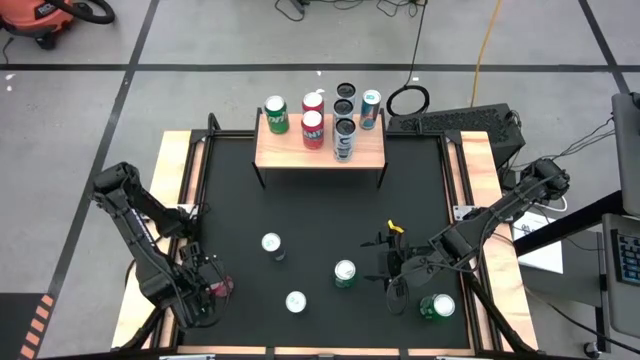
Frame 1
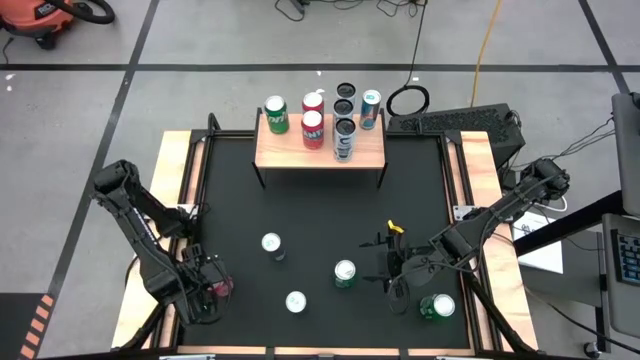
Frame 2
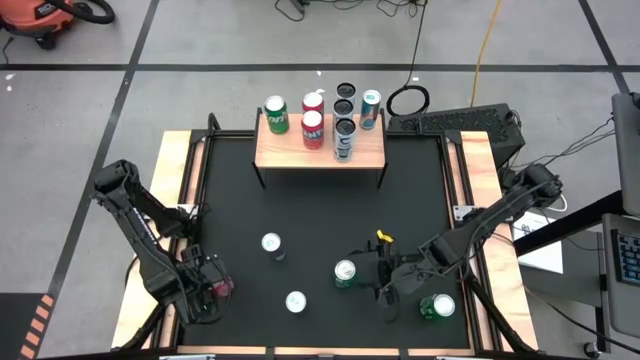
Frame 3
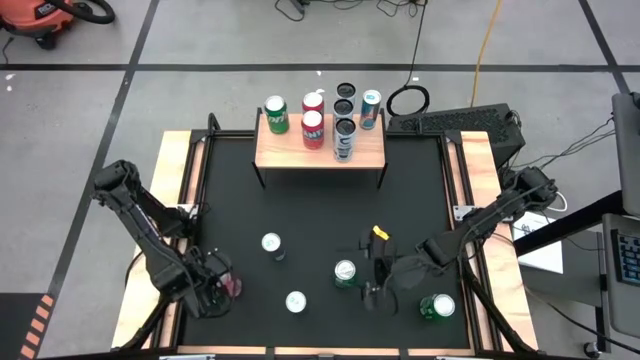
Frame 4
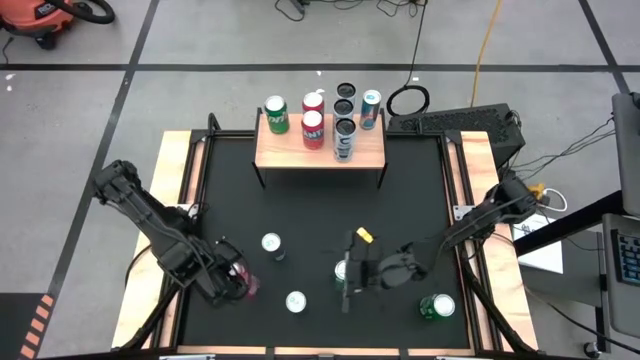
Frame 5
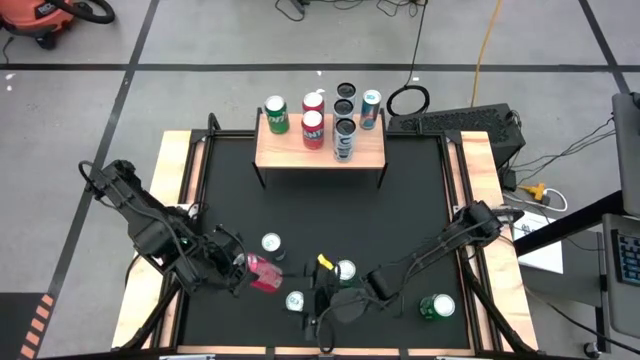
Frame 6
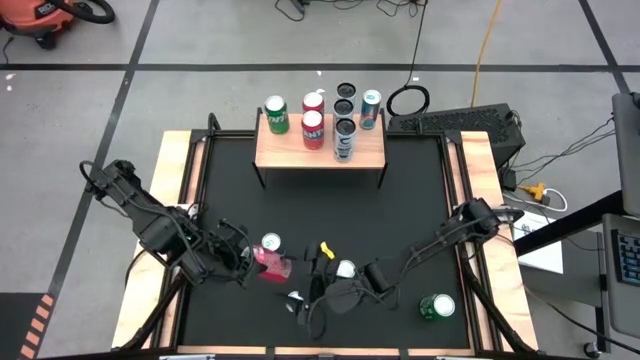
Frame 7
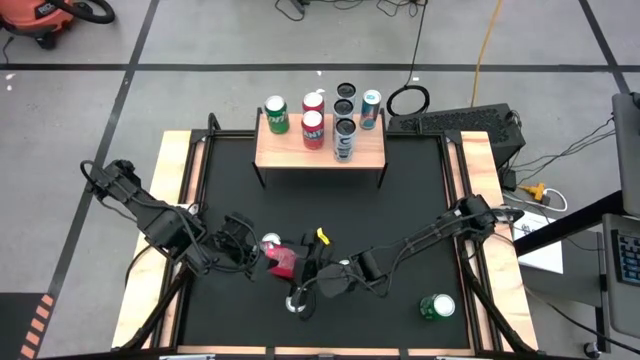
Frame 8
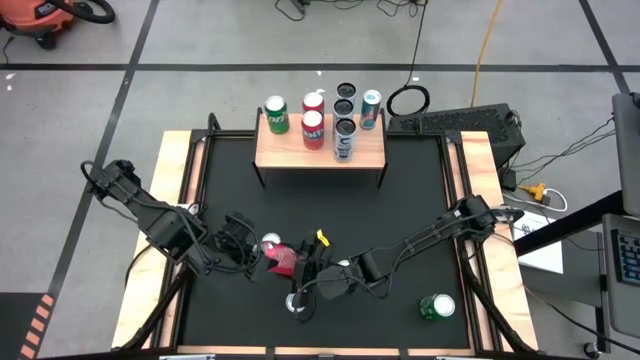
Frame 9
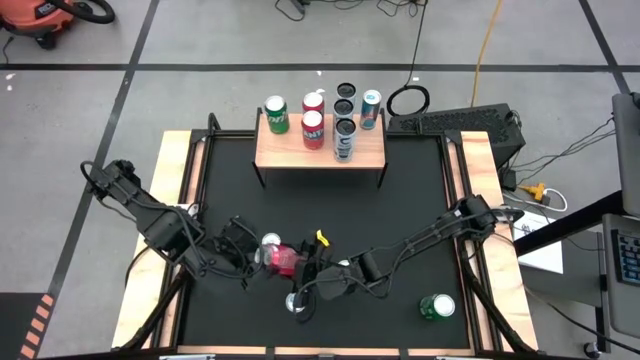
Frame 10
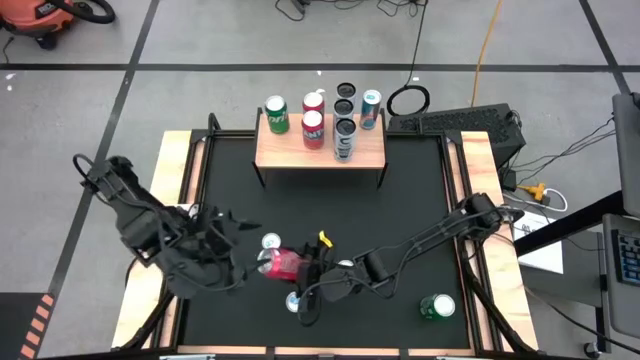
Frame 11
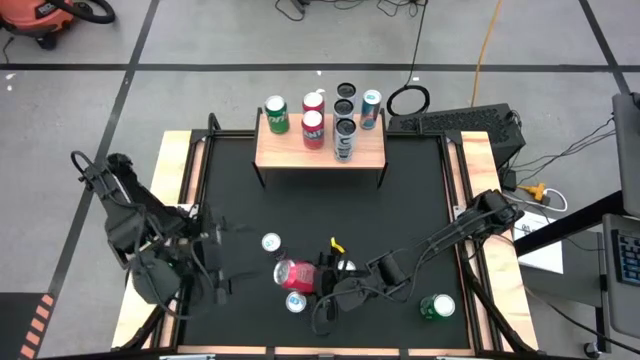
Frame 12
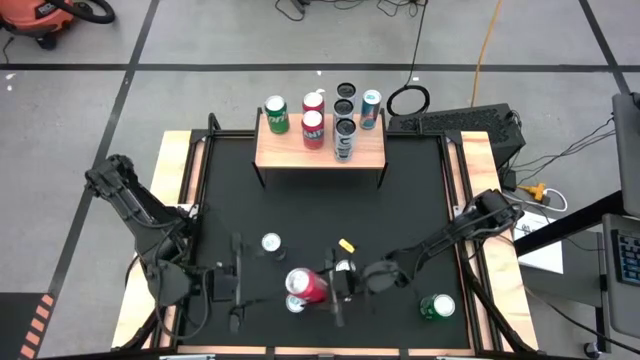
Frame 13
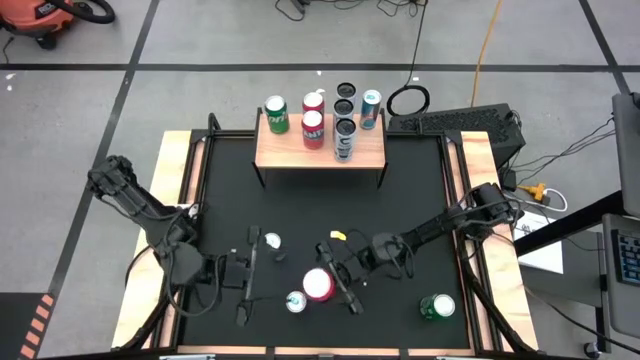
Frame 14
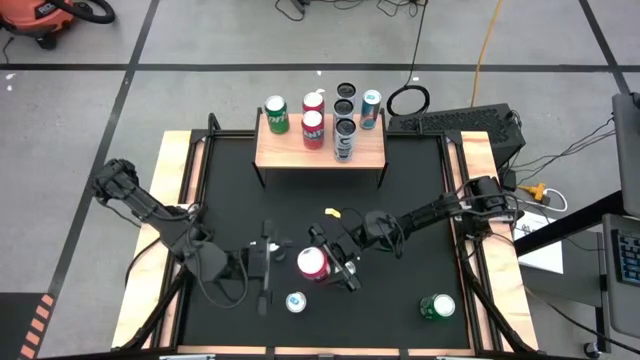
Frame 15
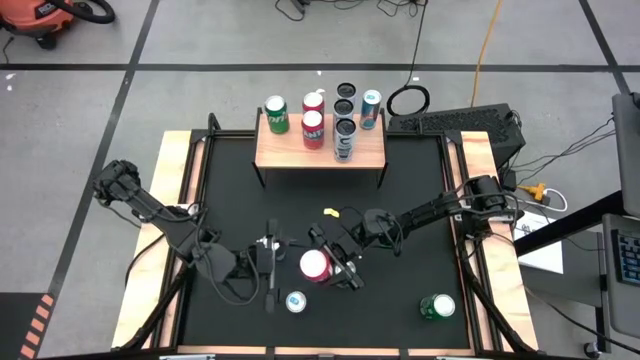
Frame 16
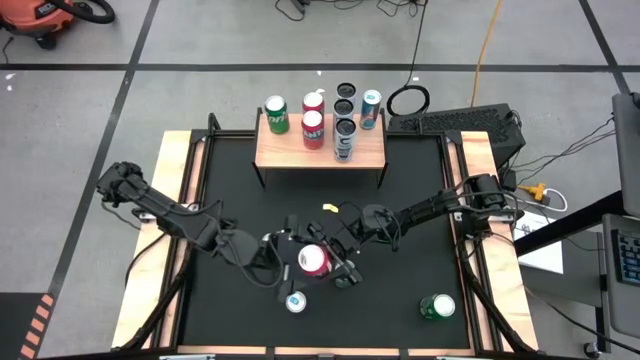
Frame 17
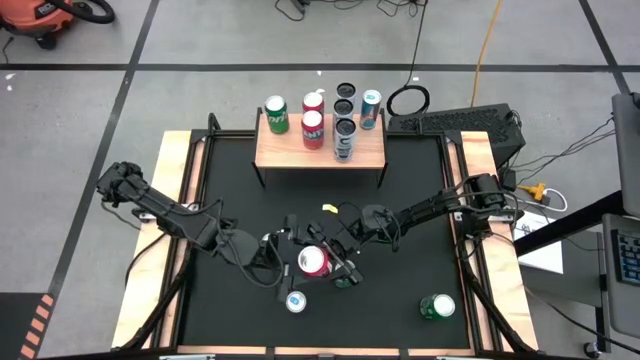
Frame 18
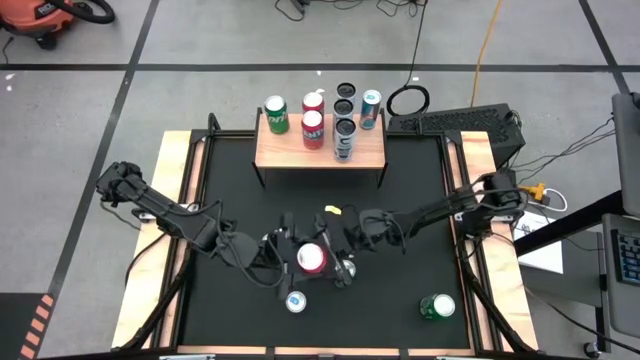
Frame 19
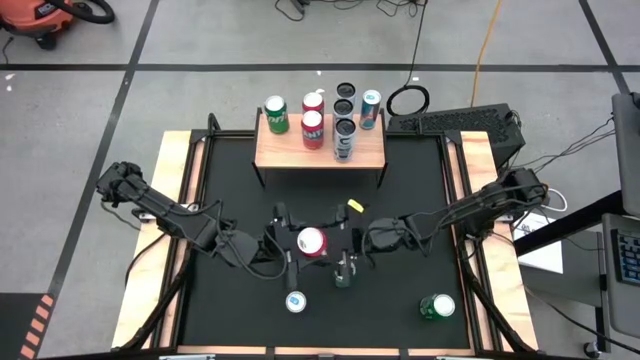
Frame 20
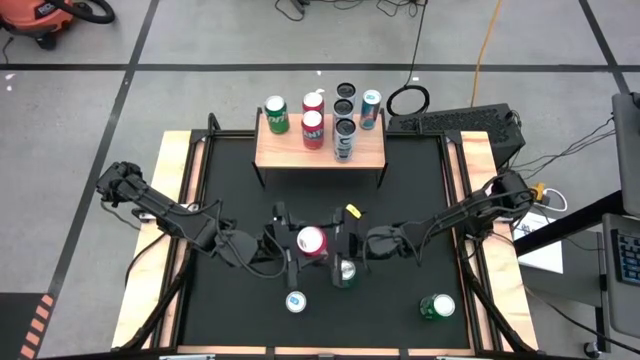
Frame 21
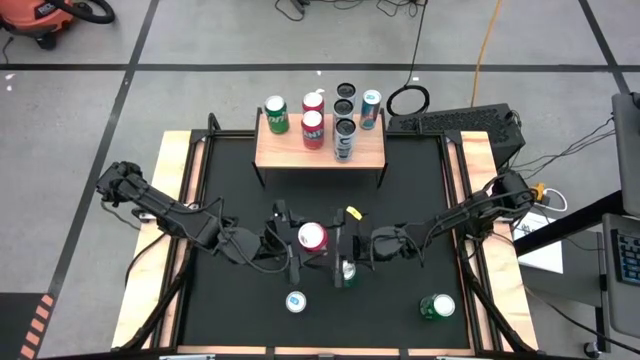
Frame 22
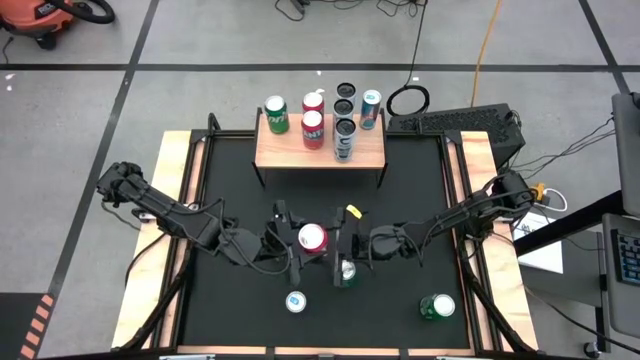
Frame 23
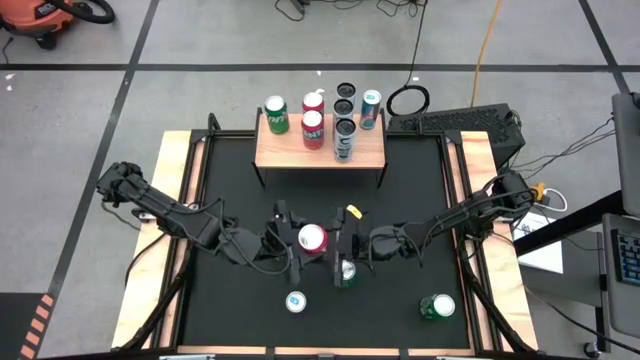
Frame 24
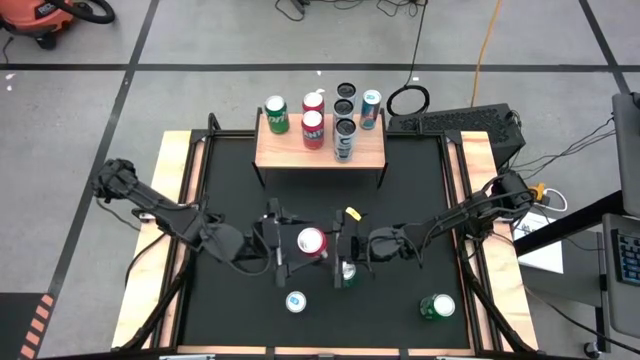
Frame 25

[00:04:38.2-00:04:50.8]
Task: Place canned beverage on shelf
Put the orange soda can on the shelf aligned with the other orange soda can

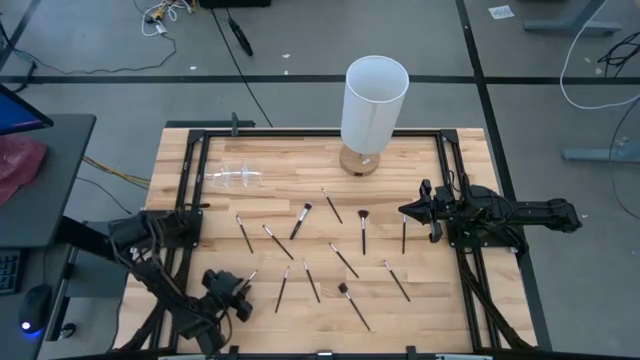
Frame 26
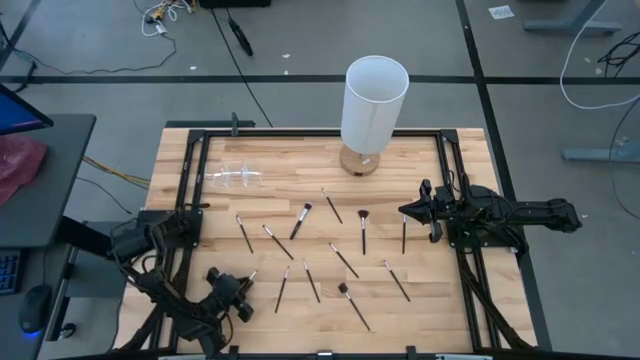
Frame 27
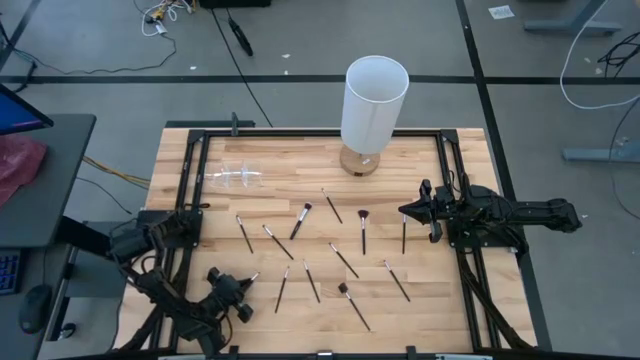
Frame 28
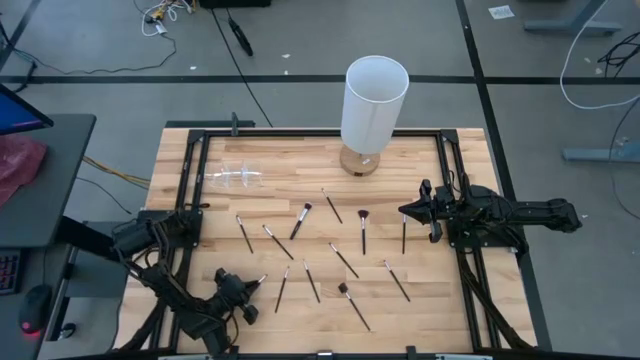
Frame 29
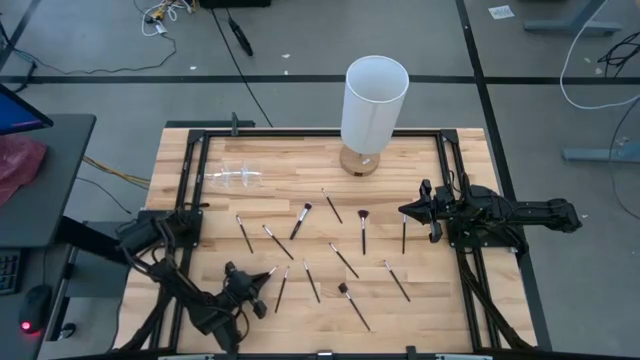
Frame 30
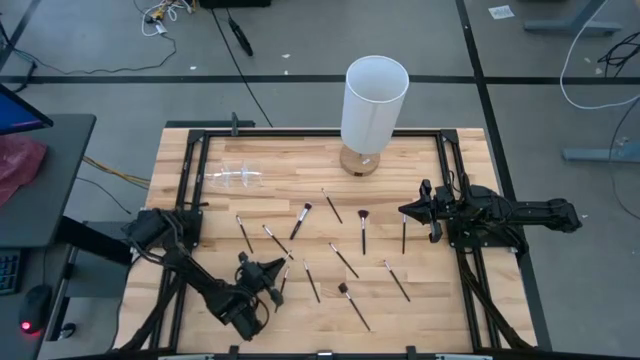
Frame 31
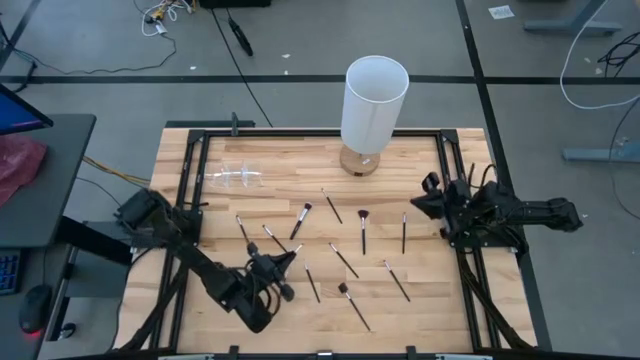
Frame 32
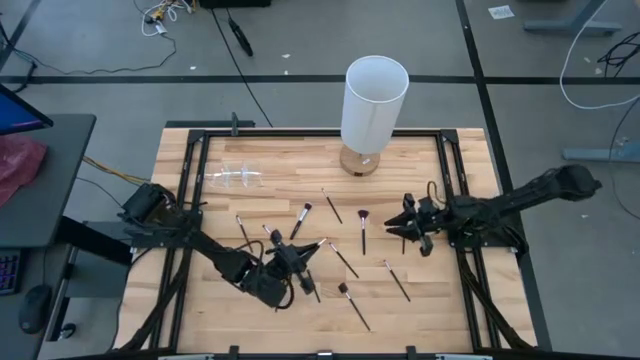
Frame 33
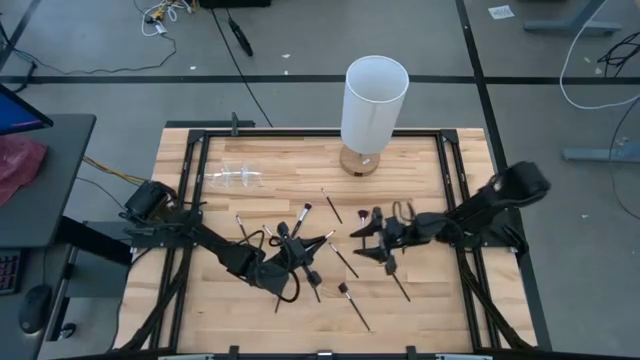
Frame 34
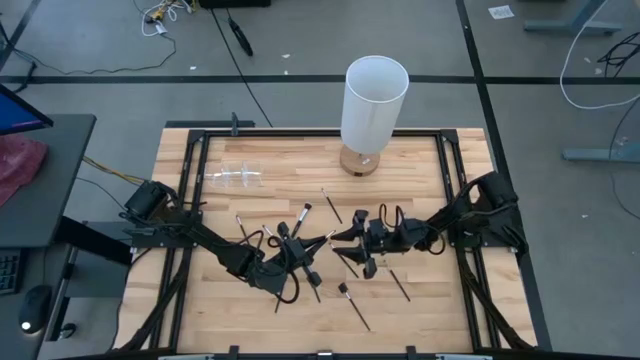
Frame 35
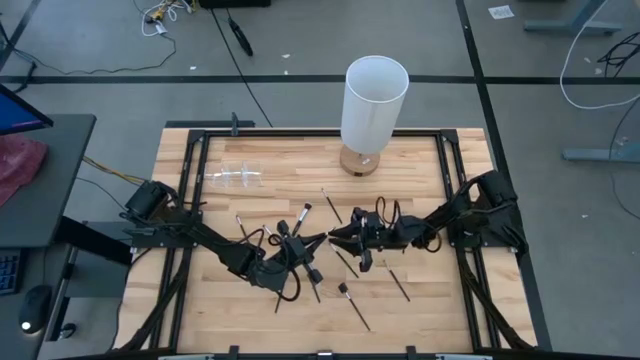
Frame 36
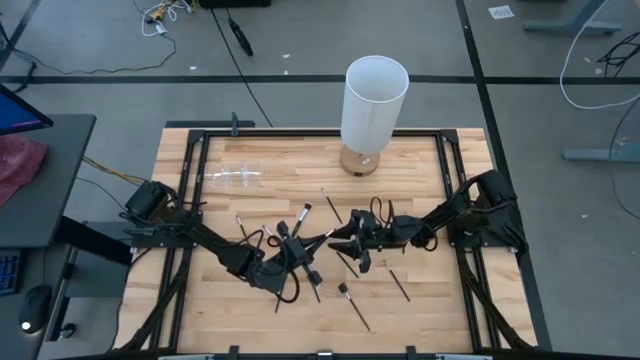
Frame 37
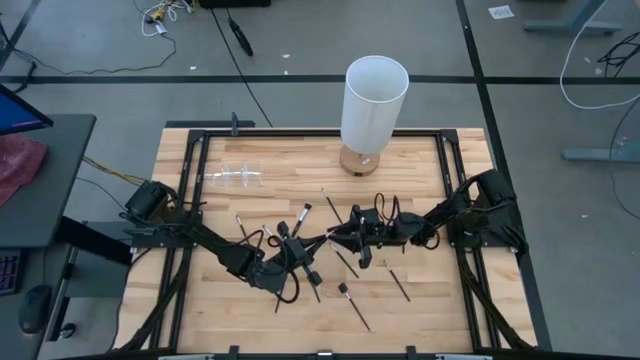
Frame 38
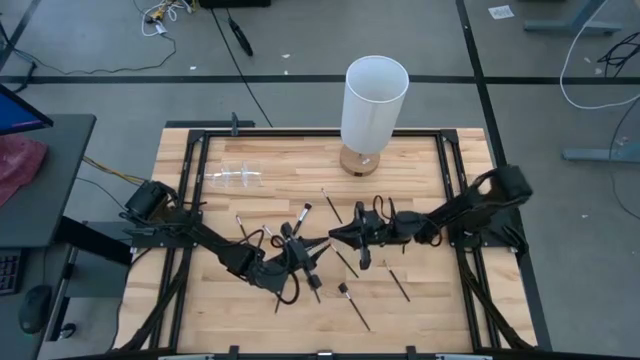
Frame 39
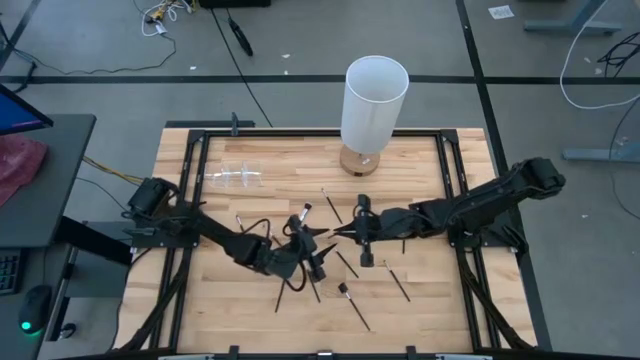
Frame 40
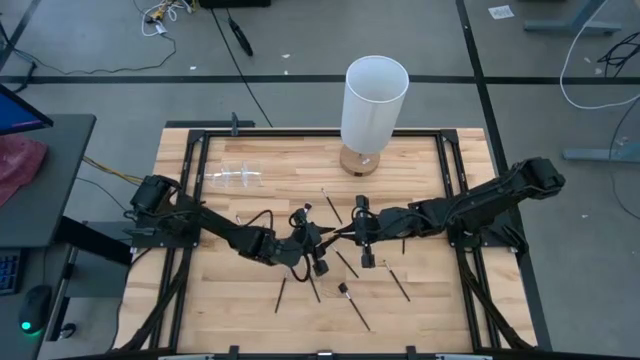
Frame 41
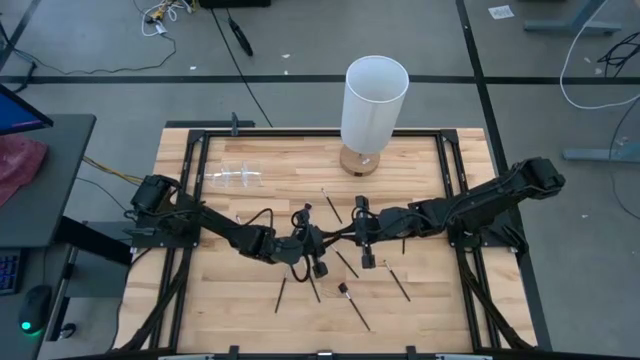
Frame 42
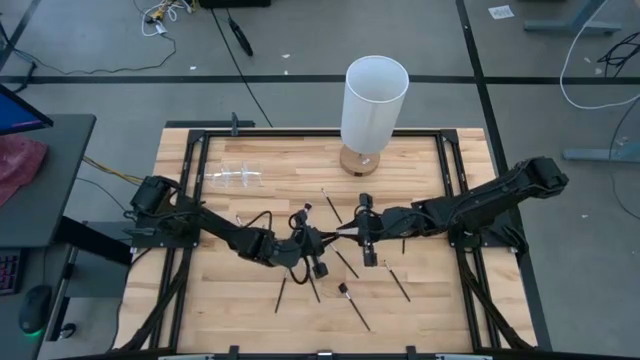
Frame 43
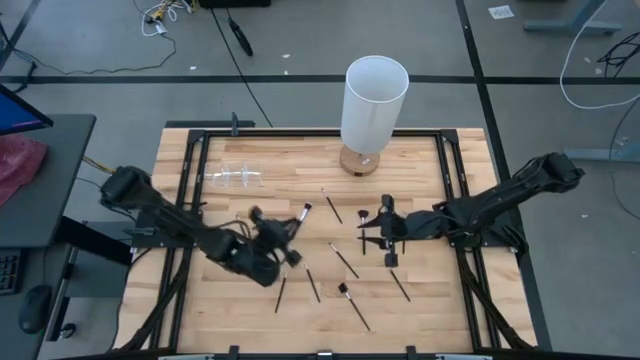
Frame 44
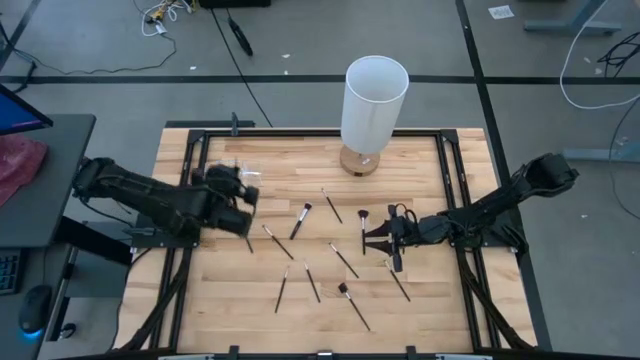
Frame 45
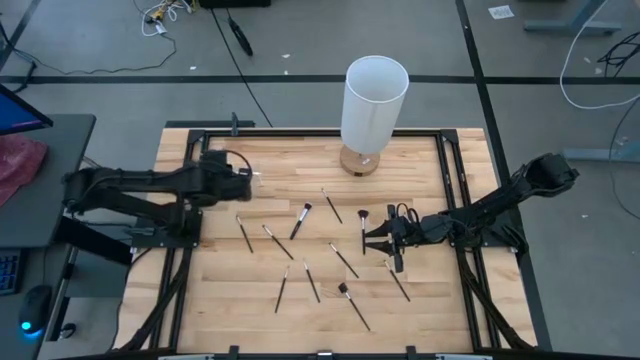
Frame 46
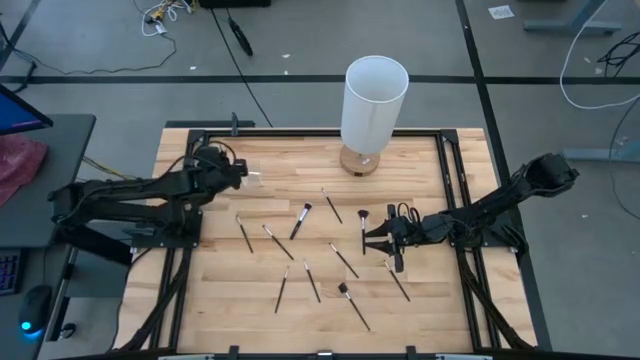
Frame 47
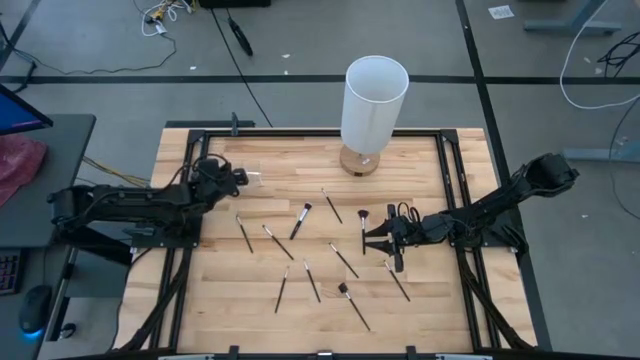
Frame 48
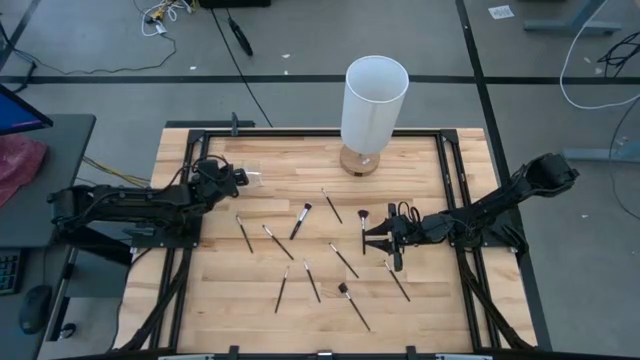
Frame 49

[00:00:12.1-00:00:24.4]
Task: Put items in baskets/containers
Put the black eyeshadow brush into the transparent organizer
